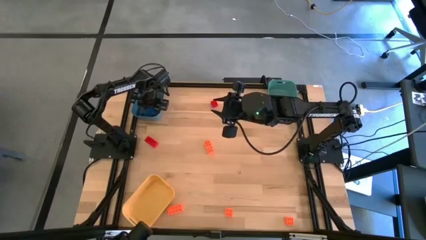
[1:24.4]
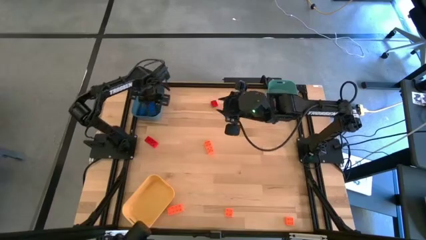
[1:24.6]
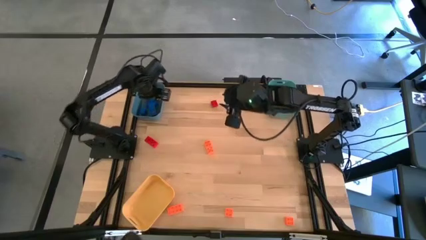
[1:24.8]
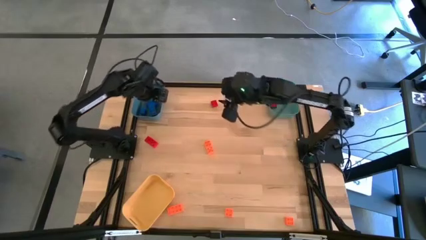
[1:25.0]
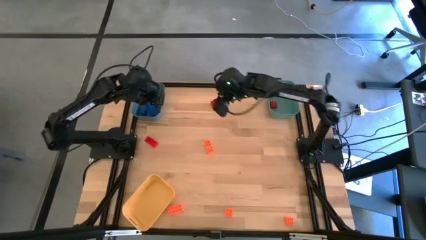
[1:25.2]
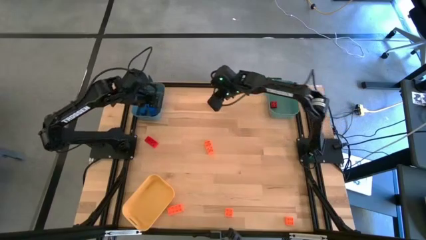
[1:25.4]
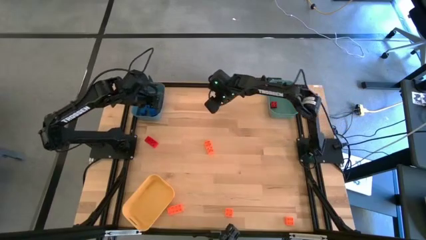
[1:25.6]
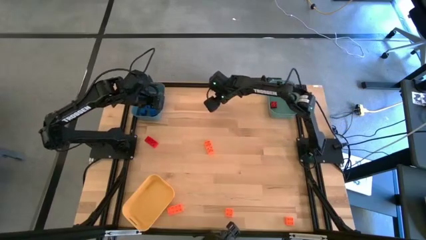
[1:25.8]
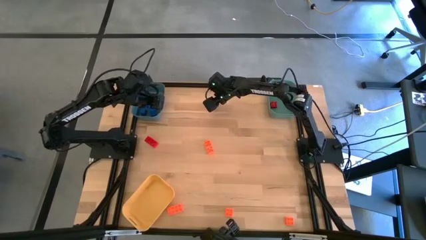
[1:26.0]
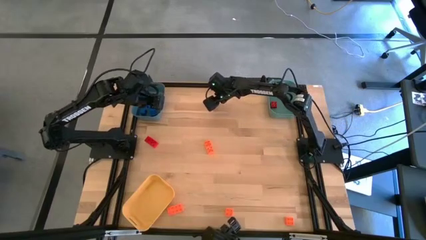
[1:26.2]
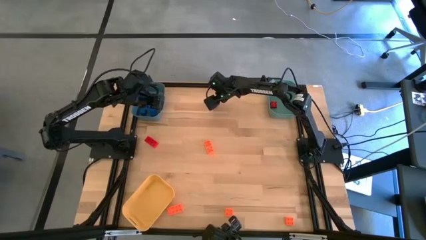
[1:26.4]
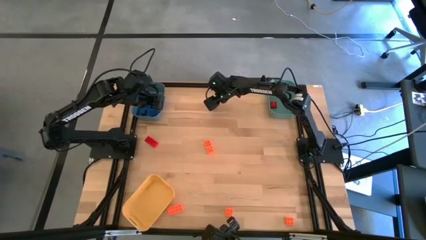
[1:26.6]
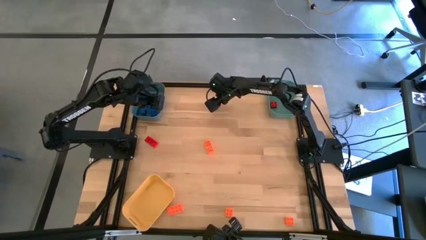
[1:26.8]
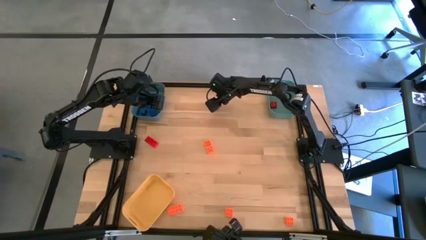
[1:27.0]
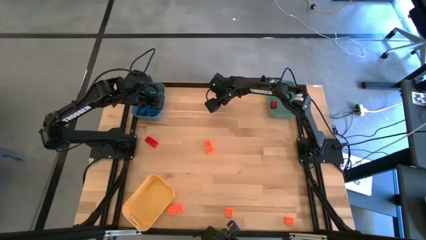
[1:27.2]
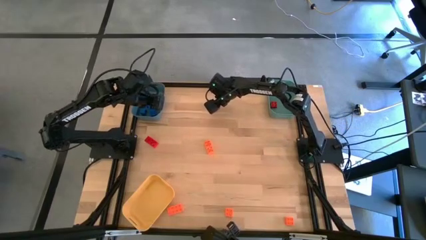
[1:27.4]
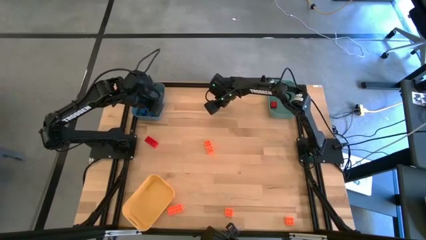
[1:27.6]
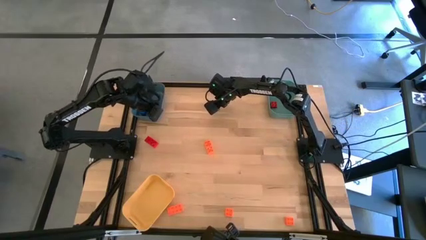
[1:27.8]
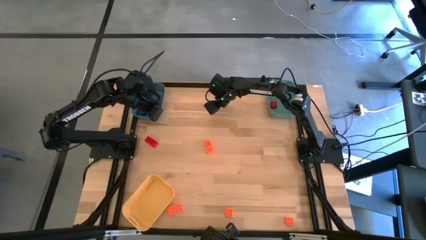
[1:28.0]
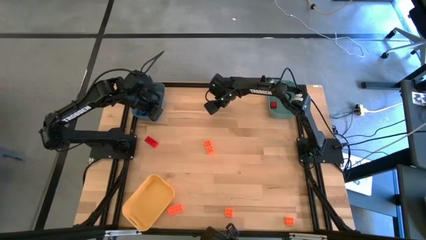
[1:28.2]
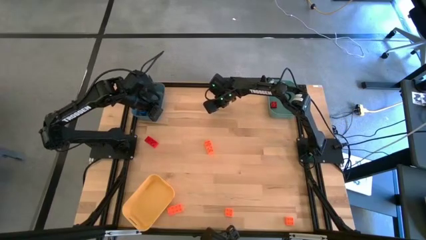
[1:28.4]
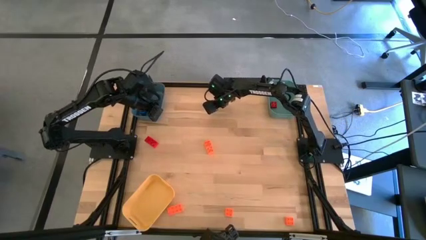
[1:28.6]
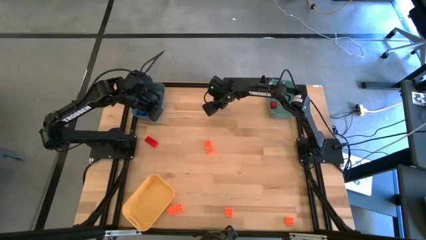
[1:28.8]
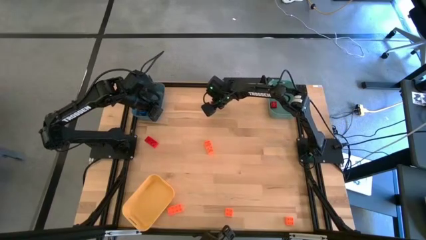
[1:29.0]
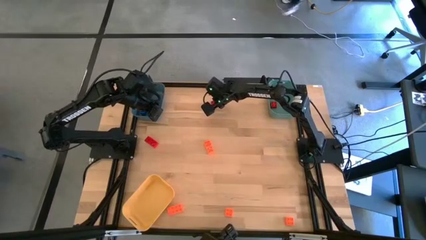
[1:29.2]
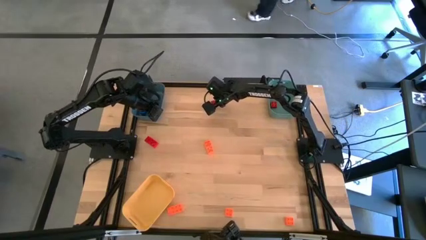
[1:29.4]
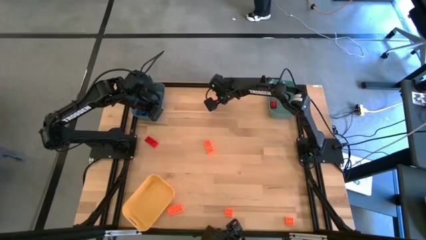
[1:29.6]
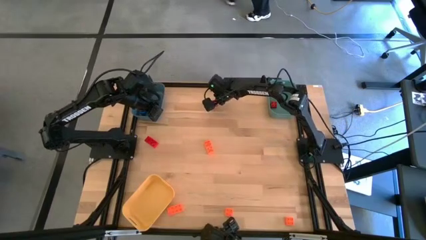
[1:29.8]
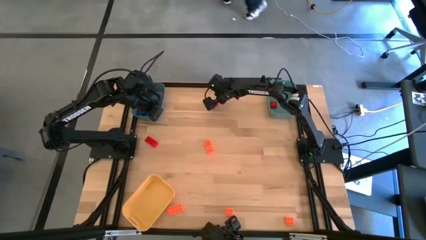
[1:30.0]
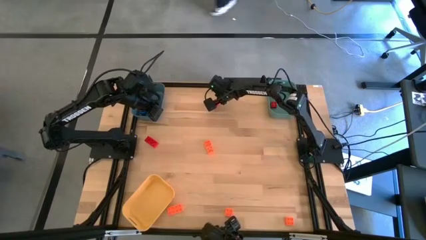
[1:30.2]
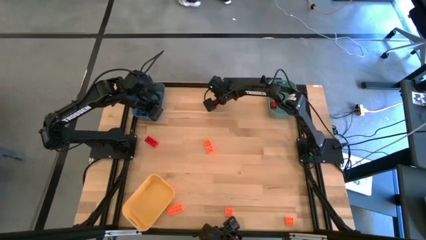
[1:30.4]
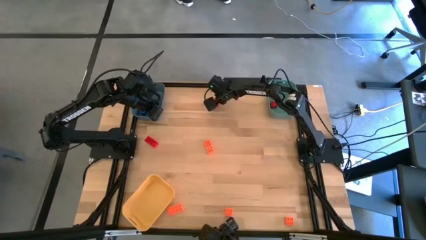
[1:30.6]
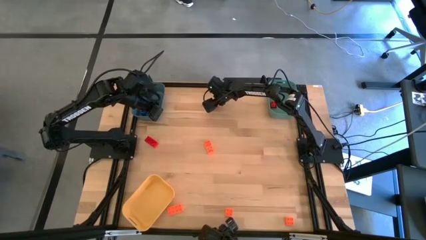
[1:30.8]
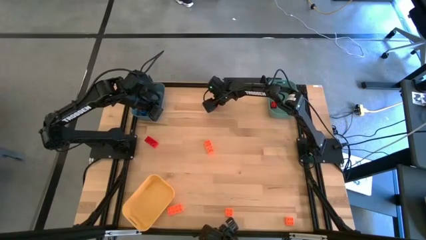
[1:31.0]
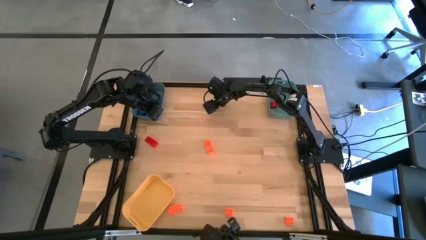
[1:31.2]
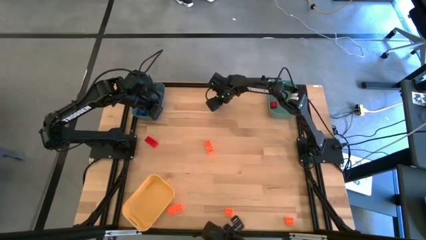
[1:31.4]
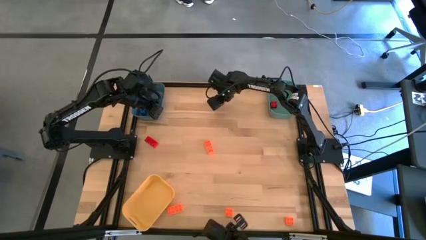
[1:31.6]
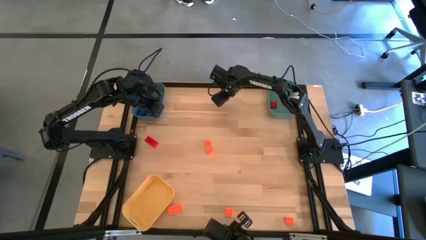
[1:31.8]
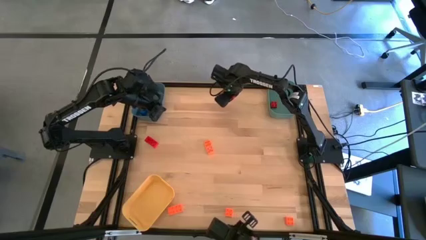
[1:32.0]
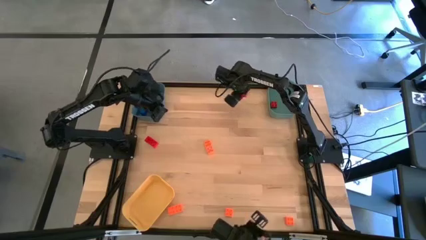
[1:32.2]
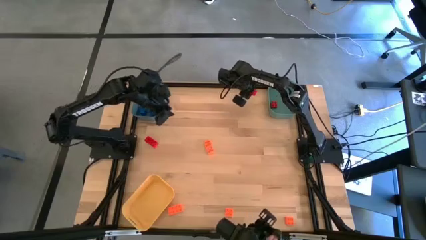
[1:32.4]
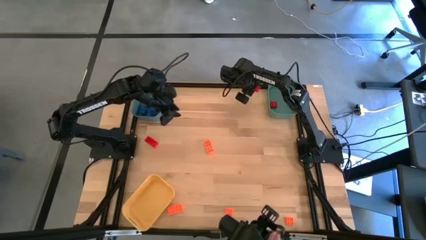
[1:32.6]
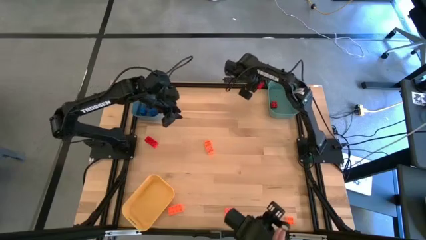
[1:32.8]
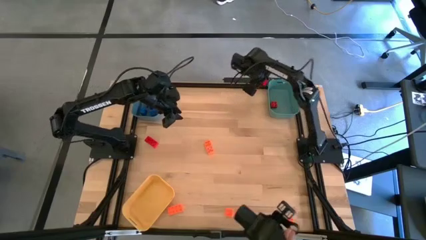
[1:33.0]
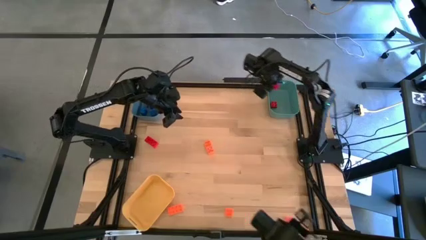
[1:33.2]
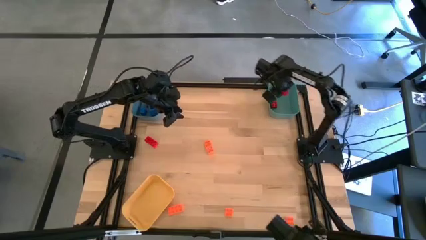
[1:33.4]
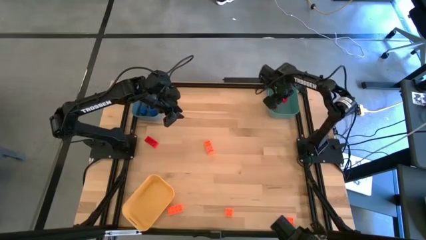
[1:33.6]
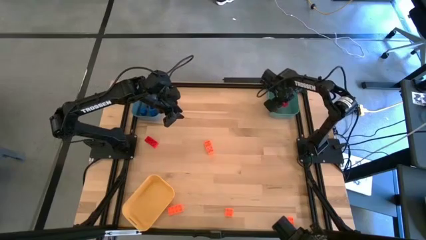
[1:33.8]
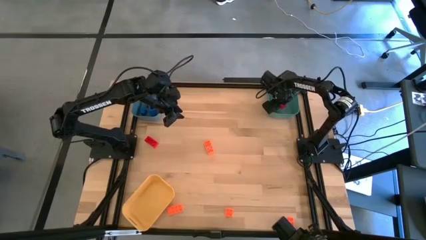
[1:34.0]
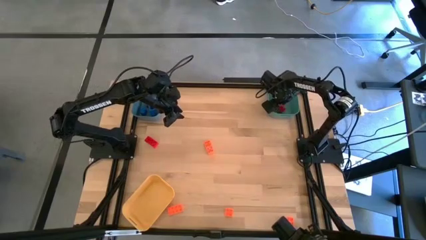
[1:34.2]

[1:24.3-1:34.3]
Task: Sort & place blocks by color
Put the top red game piece into the green bin

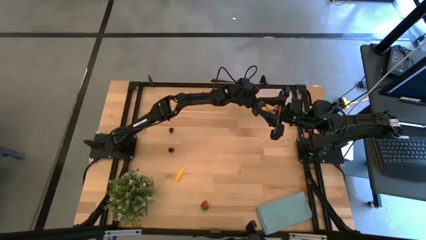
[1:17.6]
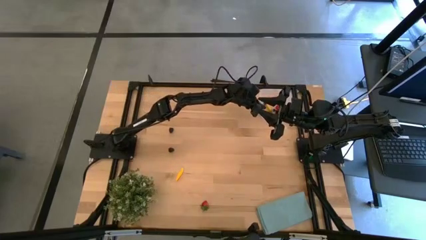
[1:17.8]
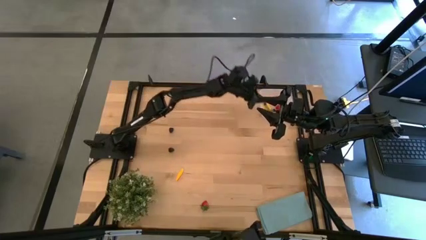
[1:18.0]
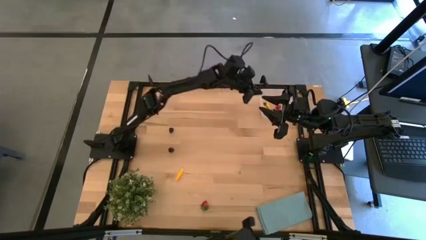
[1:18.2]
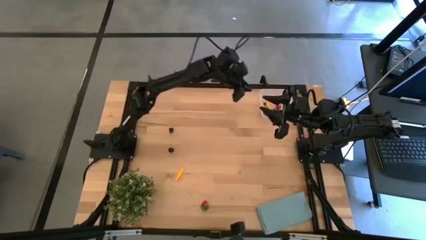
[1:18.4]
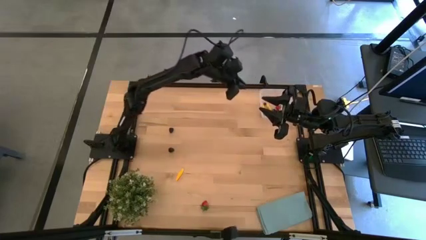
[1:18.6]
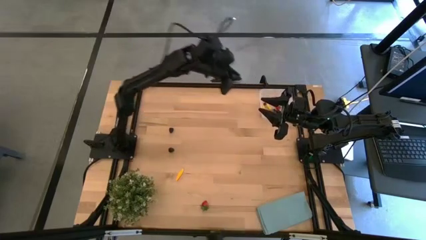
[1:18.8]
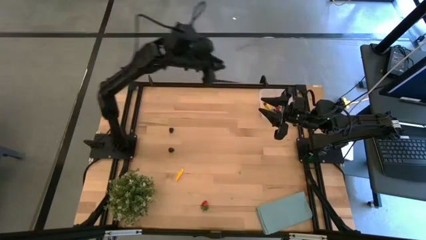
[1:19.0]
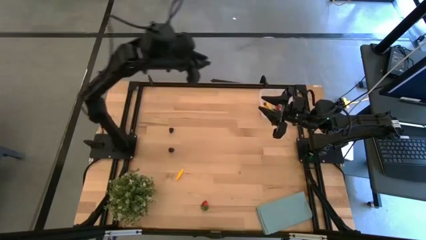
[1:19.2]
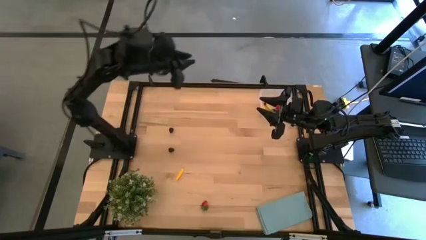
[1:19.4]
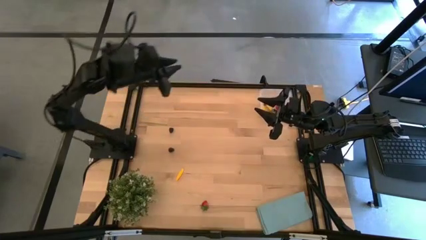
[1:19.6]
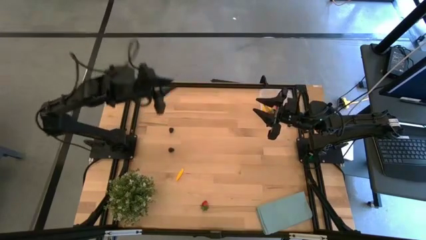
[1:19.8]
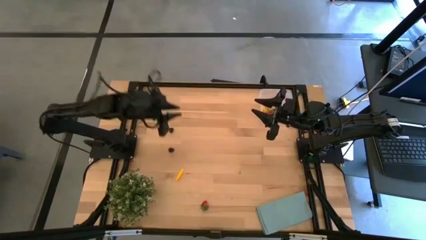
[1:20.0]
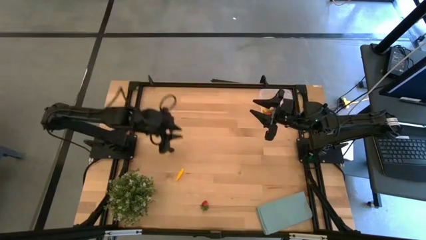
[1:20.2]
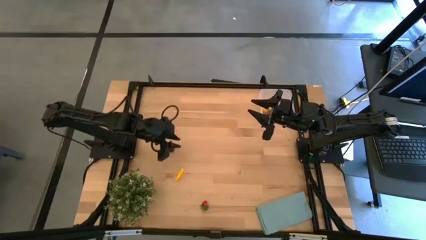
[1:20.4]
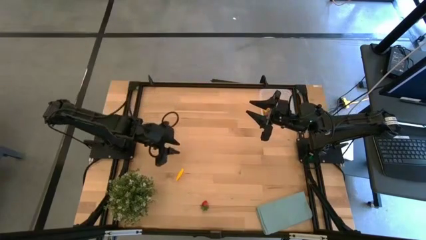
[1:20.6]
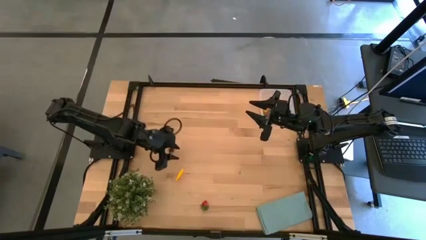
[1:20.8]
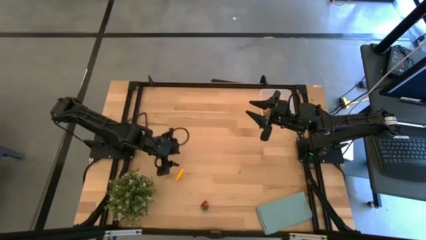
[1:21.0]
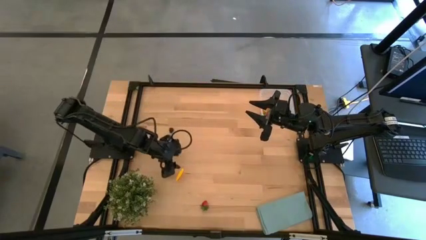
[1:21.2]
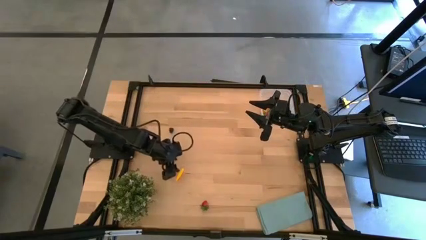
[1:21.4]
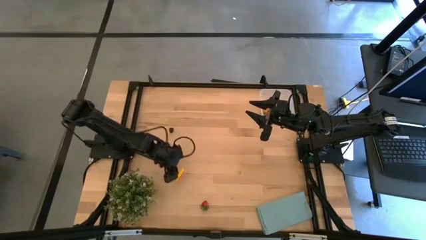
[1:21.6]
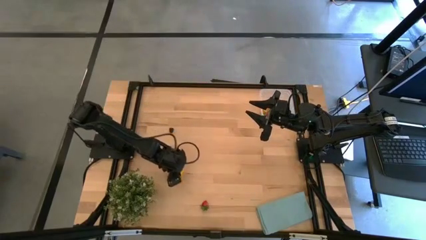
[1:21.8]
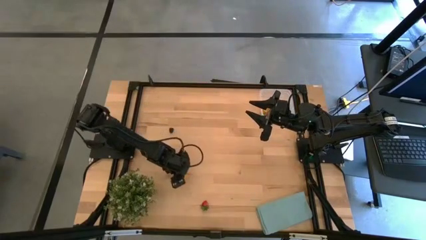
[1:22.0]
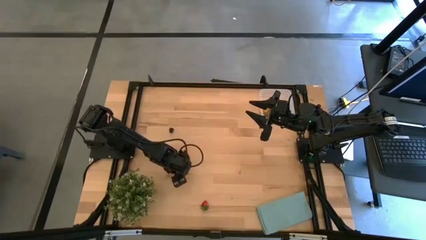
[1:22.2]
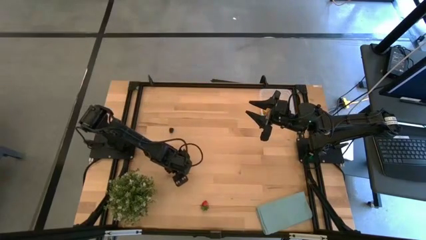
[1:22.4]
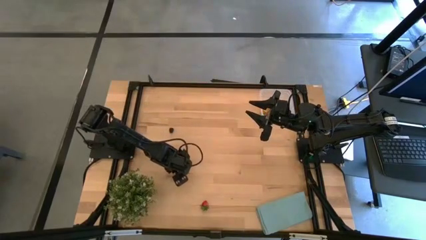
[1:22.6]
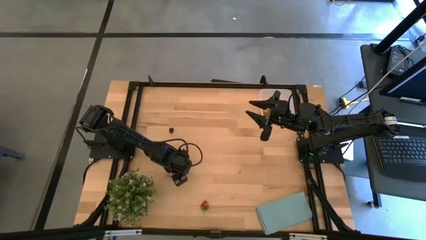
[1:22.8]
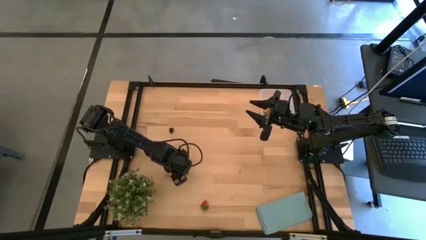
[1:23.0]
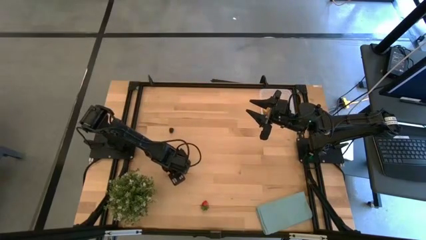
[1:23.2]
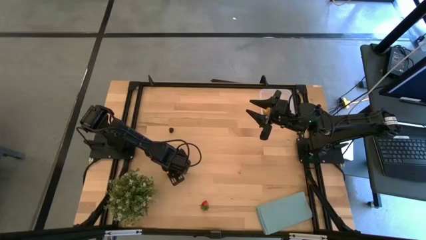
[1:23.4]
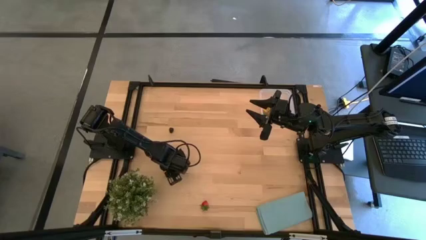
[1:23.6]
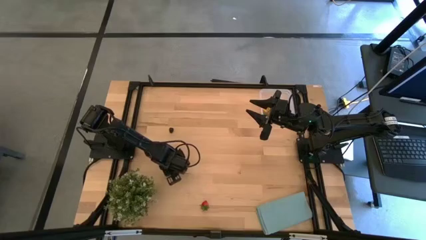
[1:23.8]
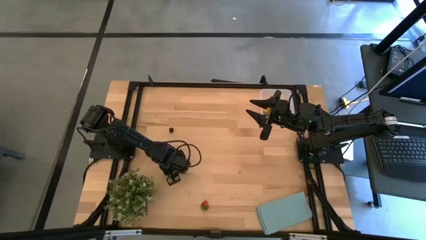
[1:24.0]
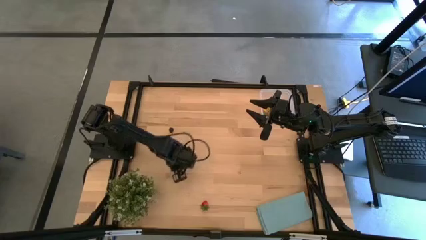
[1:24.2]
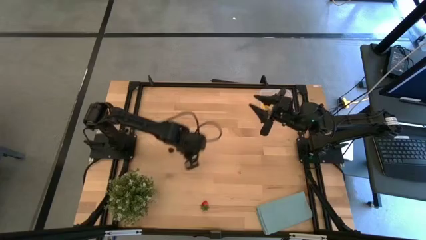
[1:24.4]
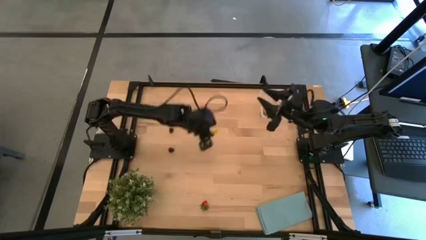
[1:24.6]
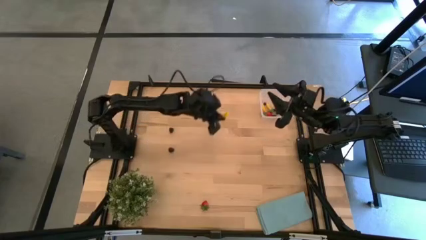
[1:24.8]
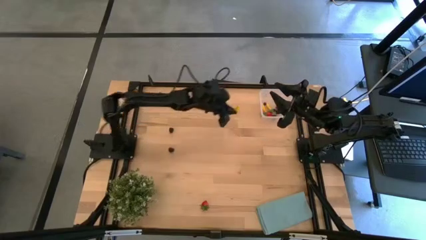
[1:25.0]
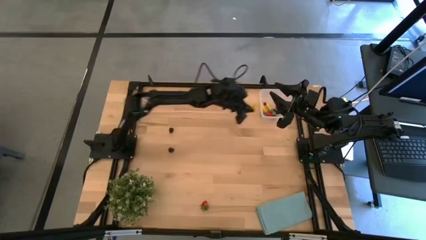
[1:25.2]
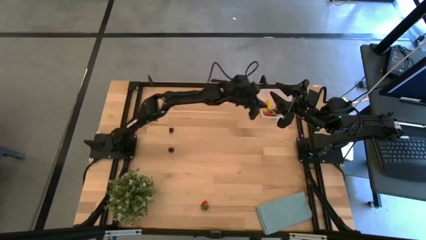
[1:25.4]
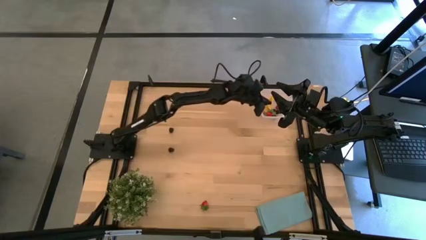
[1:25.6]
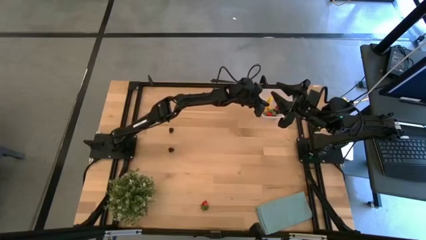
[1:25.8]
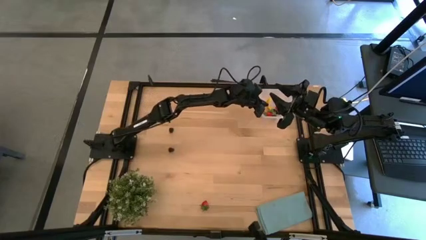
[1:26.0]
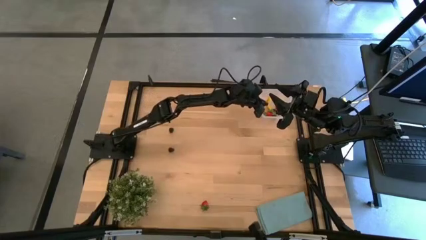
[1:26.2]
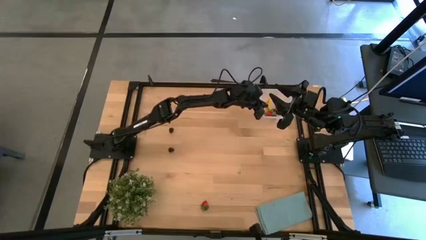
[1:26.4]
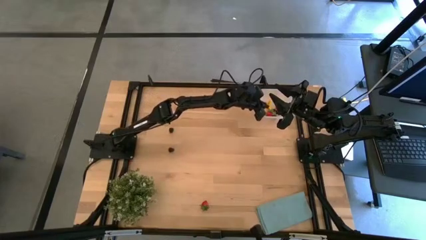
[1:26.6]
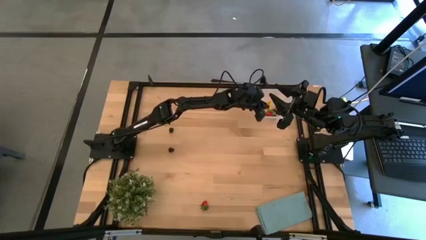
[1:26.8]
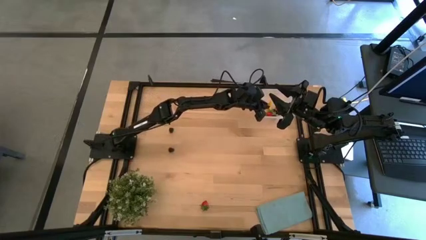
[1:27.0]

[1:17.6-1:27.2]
Task: Pick and placing Produce into tupperware
Put the yellow corn into the transparent bin
